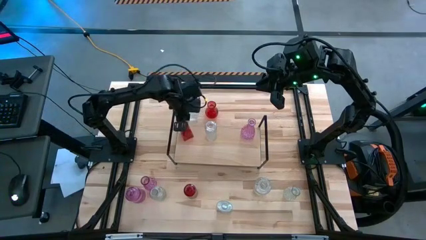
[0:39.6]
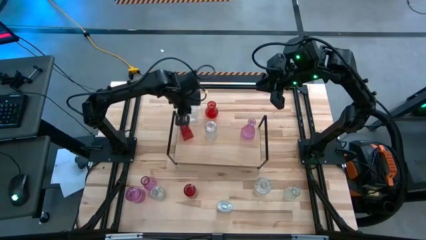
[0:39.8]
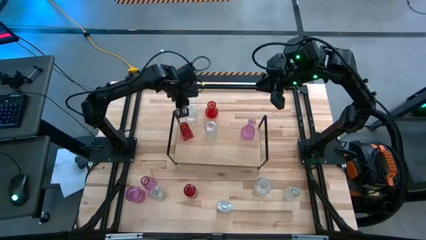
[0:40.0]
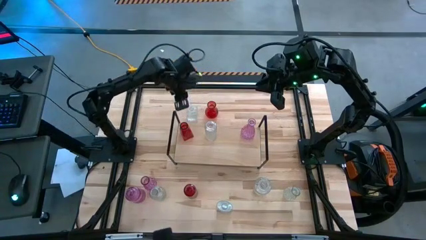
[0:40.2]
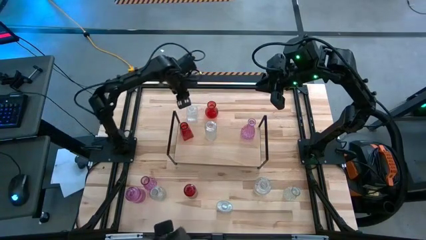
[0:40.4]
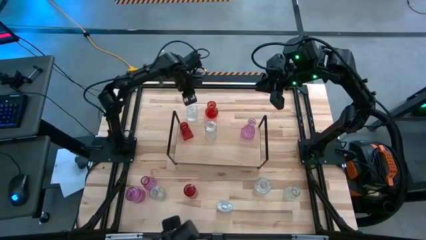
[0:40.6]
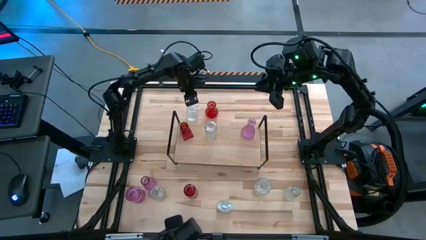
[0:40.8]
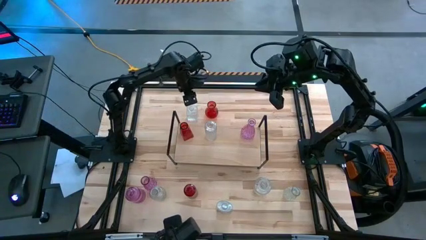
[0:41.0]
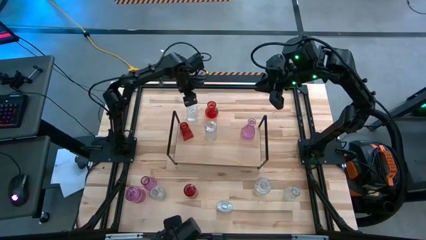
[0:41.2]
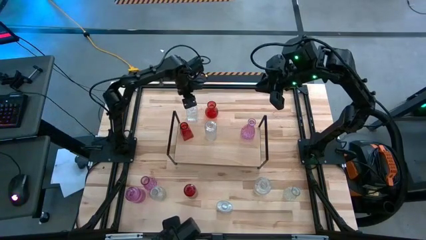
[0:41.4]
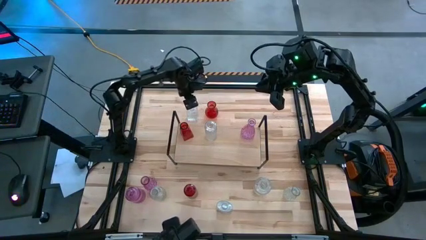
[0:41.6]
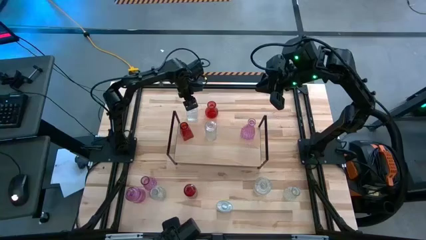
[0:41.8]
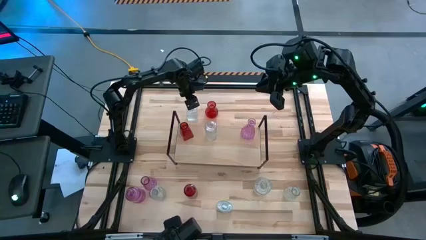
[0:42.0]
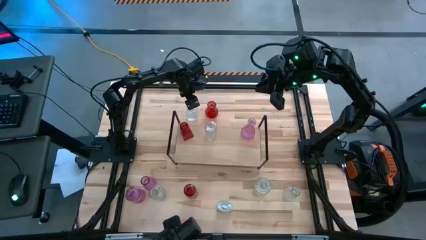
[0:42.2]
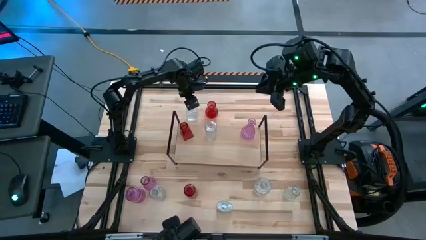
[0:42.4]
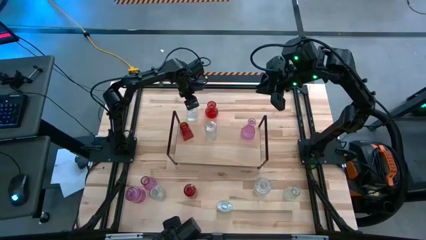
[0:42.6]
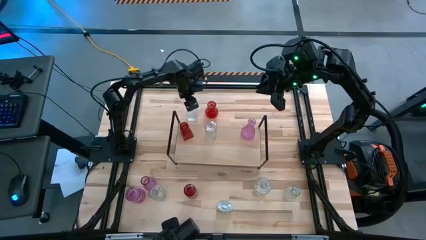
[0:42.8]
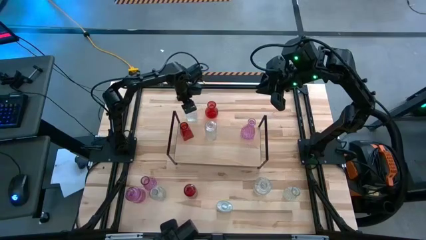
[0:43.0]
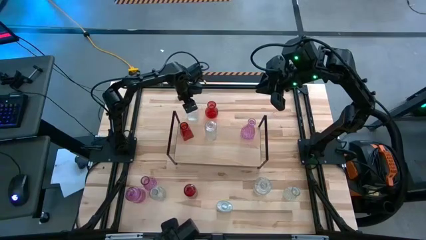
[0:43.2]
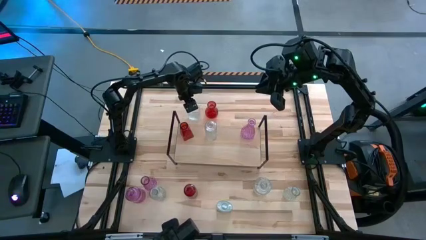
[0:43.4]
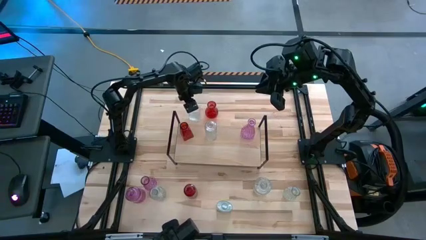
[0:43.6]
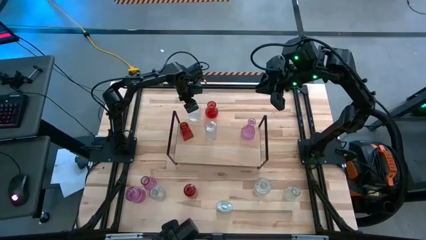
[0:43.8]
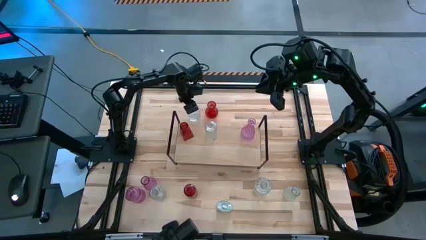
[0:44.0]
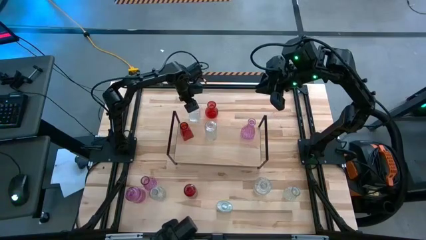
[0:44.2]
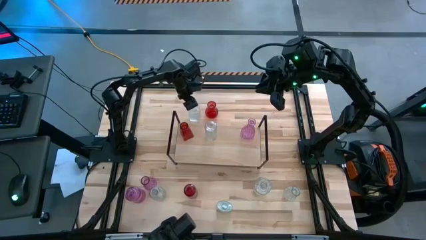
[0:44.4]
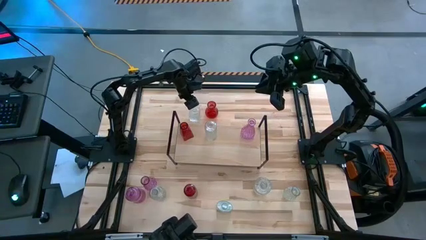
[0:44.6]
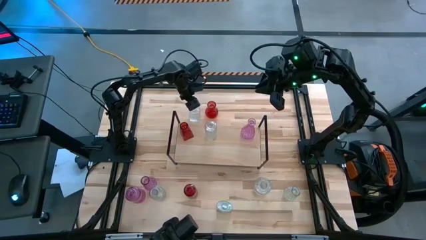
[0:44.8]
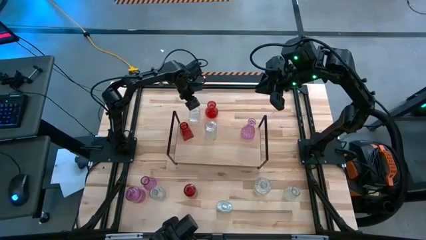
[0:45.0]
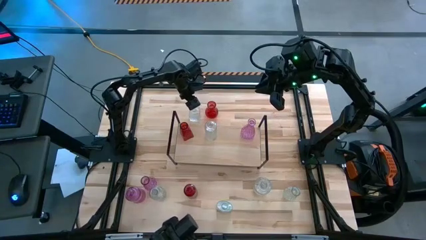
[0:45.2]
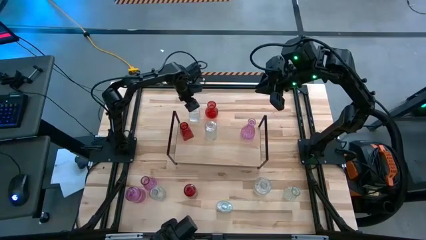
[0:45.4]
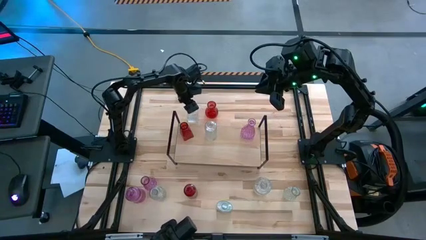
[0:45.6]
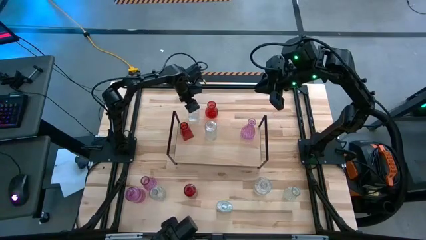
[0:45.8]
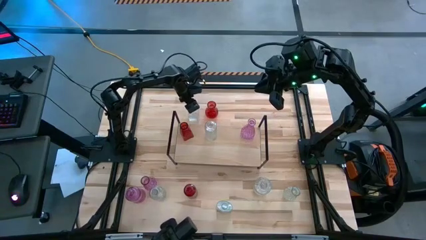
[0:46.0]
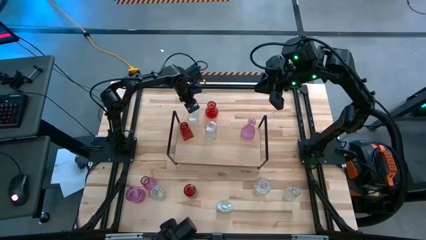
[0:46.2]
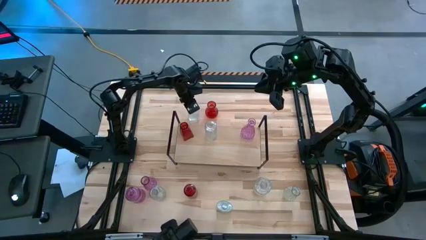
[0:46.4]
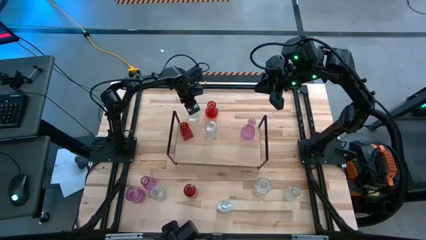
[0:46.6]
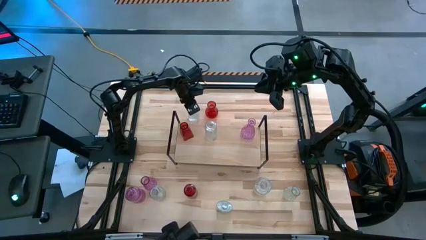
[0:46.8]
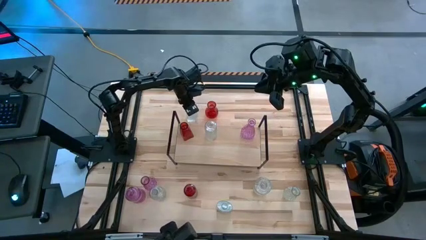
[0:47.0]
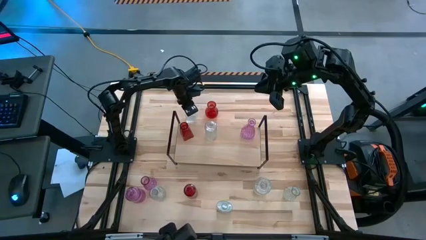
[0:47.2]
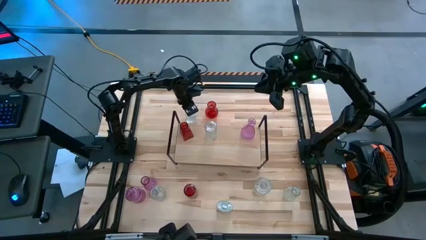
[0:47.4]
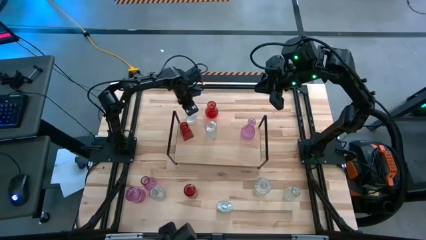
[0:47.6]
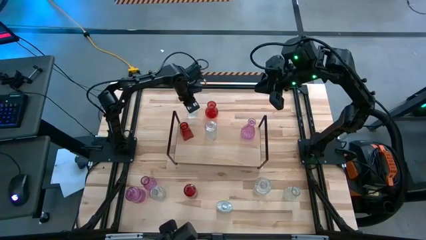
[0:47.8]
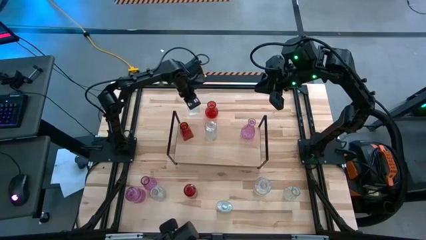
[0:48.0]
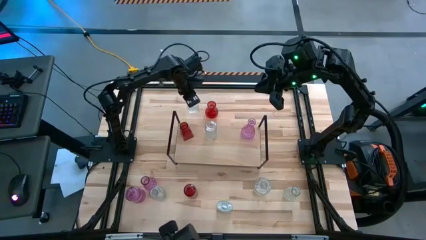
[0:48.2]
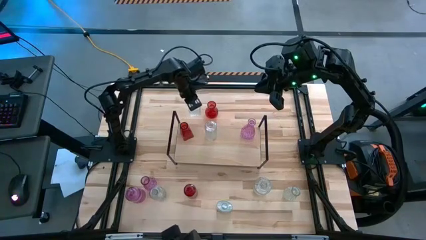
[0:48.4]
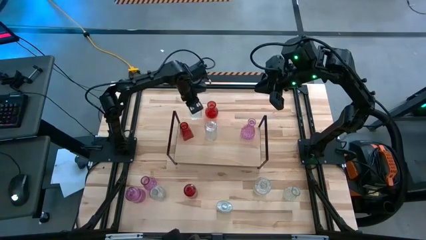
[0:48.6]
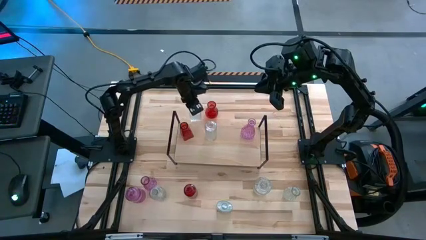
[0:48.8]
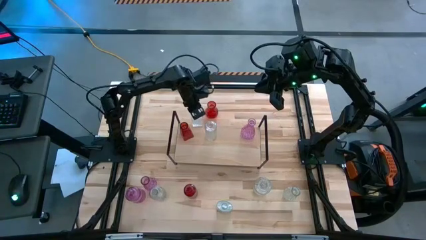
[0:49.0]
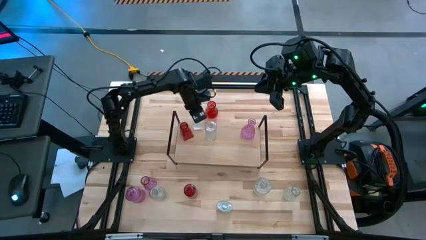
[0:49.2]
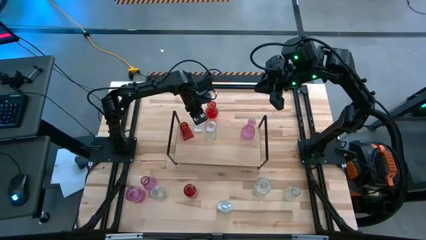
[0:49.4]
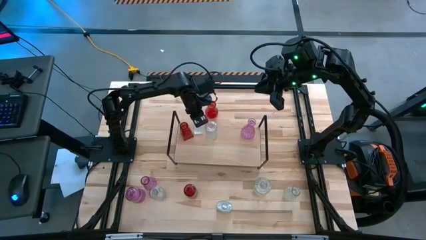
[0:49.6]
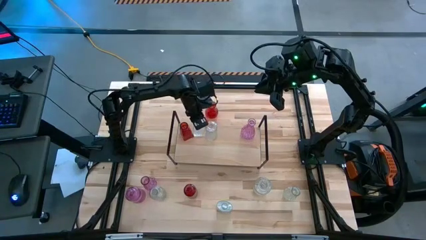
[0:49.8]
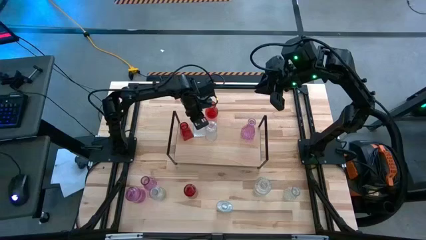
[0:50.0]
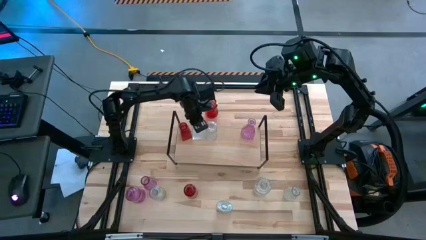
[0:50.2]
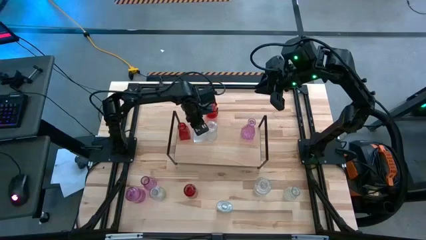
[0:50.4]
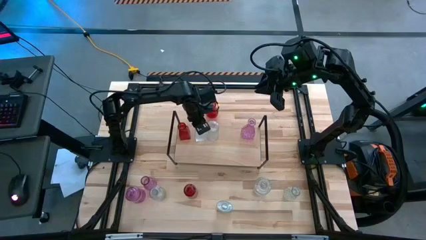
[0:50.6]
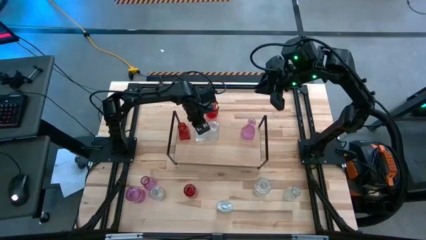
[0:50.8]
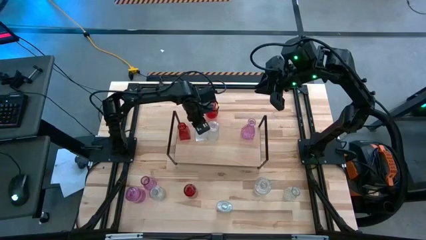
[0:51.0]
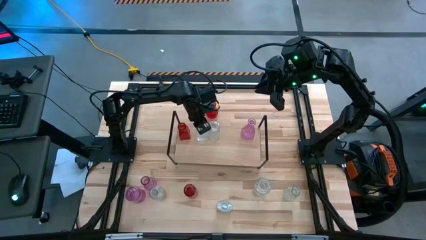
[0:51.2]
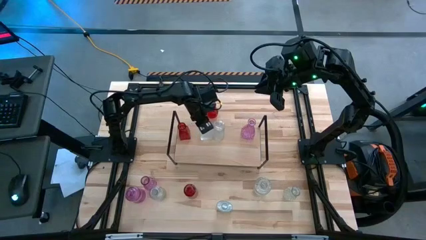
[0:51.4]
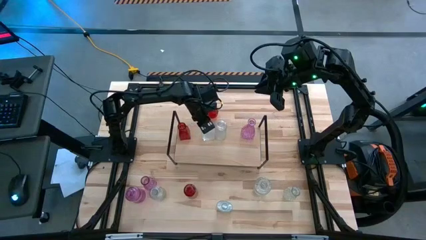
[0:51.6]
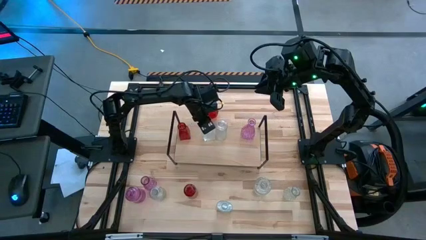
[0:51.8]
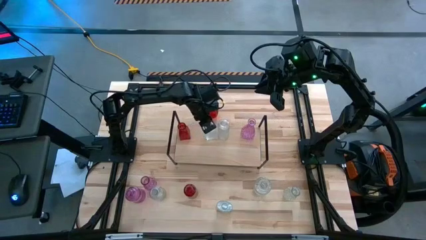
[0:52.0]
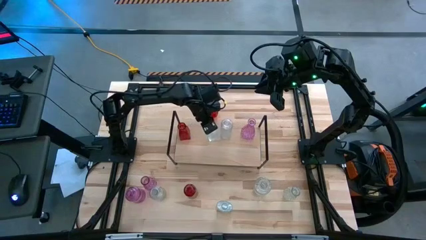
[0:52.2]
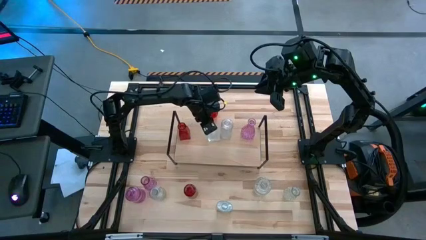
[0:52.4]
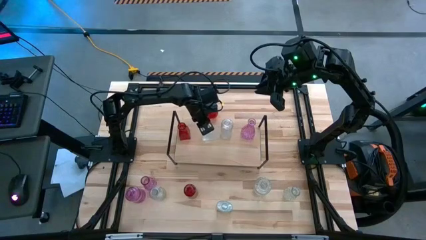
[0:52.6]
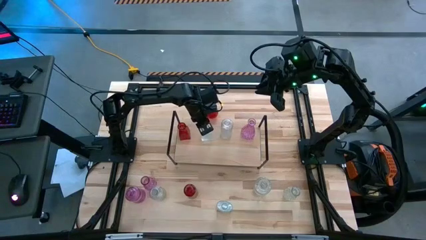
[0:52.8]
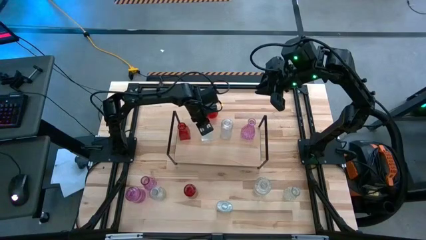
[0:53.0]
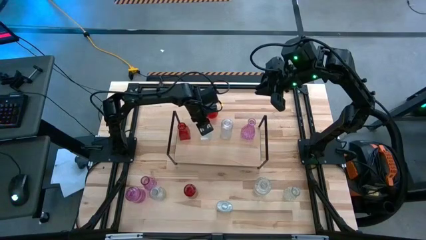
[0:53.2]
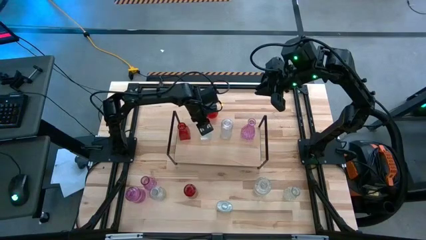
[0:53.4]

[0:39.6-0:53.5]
Task: sort vases onto shelf
Put the transparent vase on the shelf

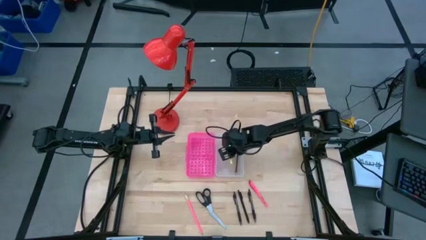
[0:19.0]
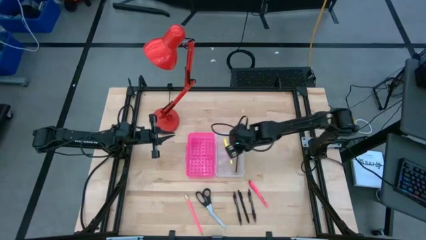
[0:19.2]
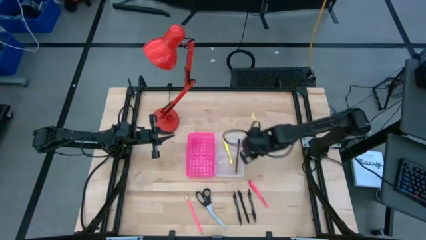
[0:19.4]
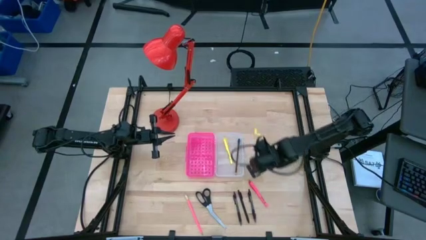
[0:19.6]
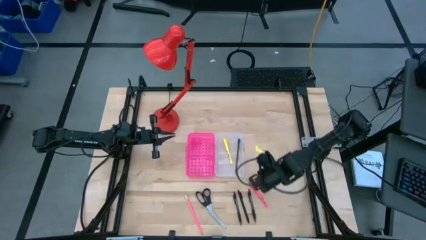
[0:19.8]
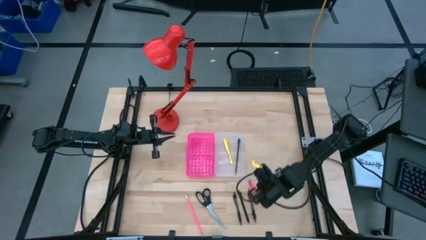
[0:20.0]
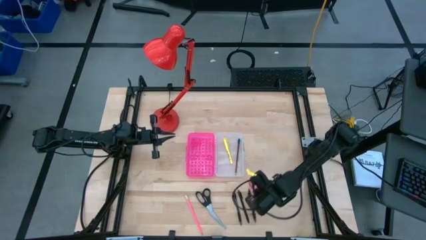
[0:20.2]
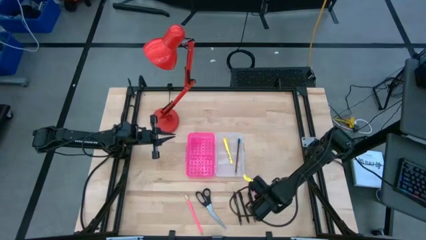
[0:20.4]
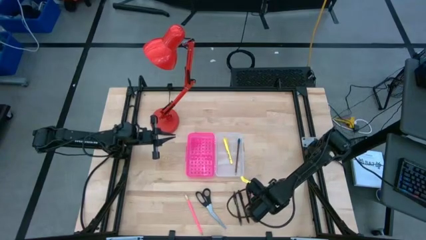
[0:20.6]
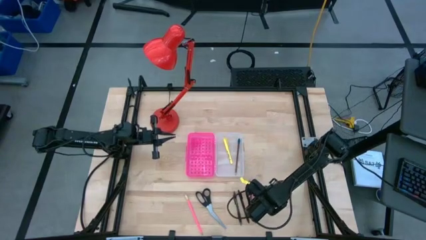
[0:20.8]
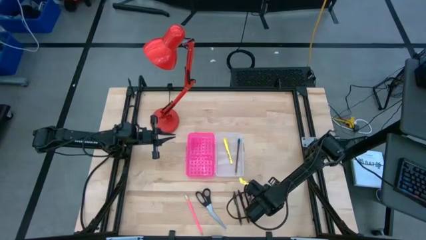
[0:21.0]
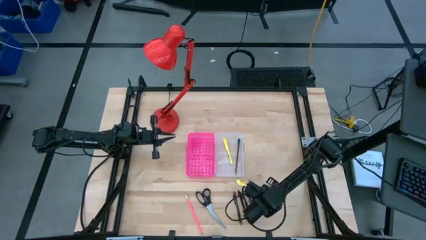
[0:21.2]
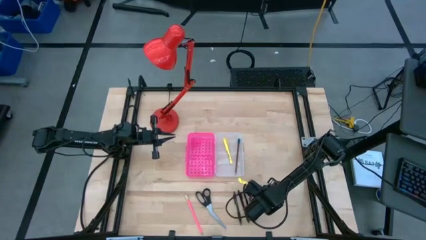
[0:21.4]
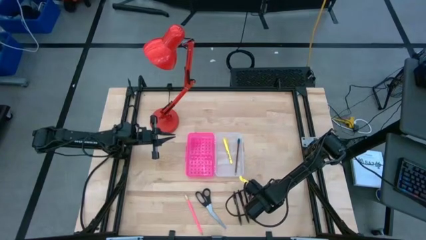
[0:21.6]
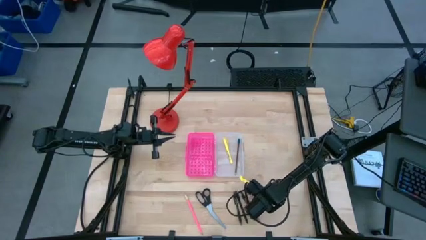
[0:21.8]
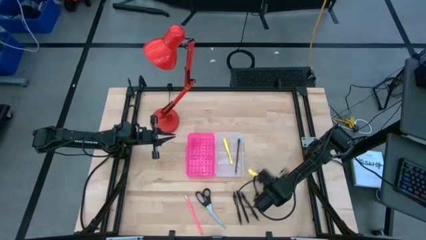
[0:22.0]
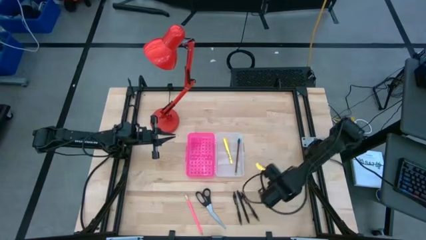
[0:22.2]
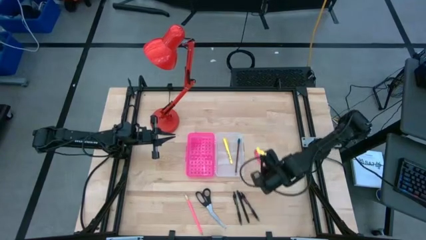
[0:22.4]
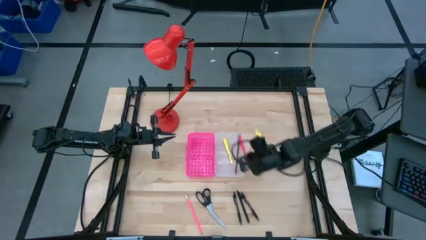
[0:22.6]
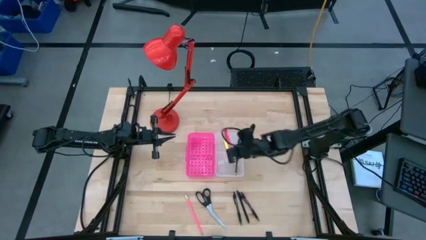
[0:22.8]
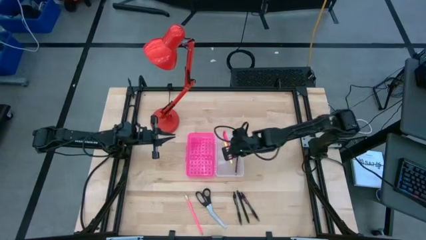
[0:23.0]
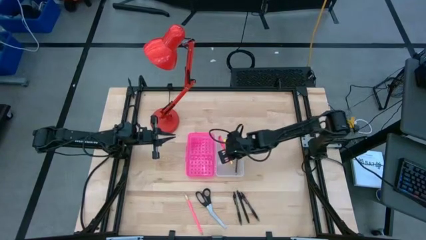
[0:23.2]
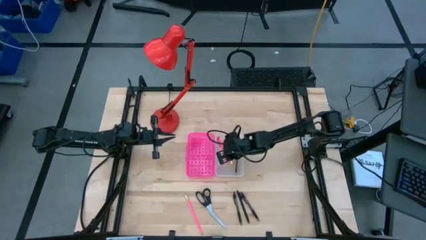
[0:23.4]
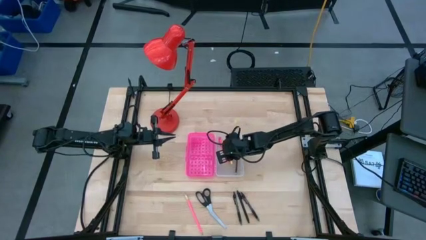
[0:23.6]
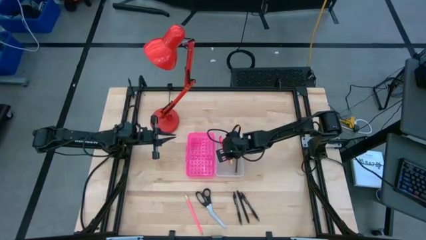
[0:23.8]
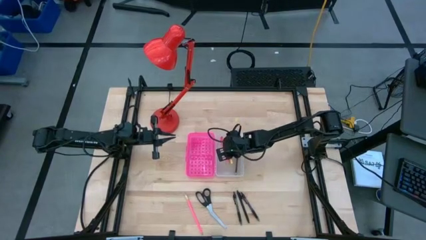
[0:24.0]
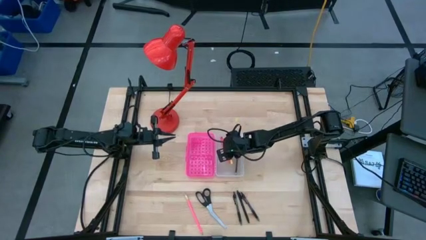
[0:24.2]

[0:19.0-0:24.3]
Task: Pick & place school supplies into a supply box
Put the pink pen into the pink supply box
